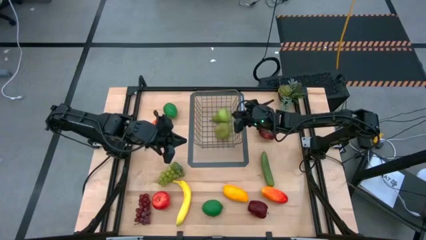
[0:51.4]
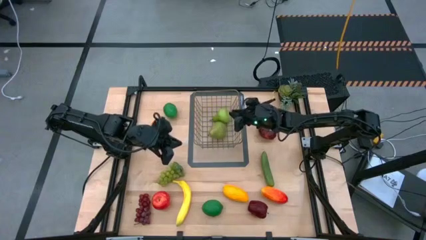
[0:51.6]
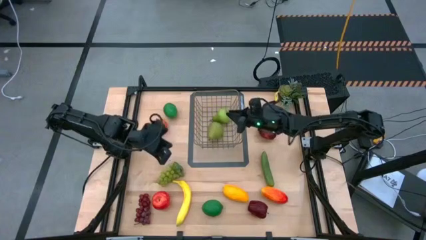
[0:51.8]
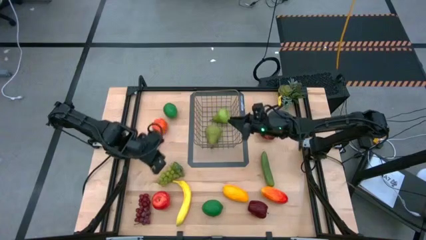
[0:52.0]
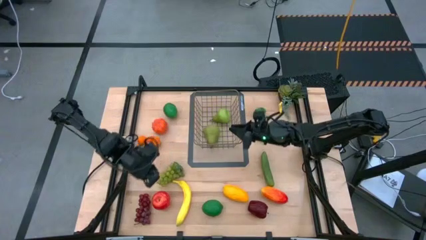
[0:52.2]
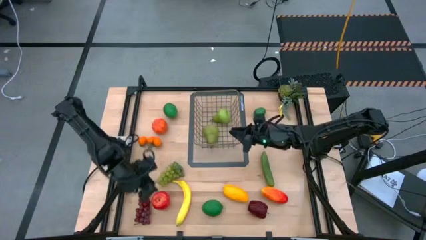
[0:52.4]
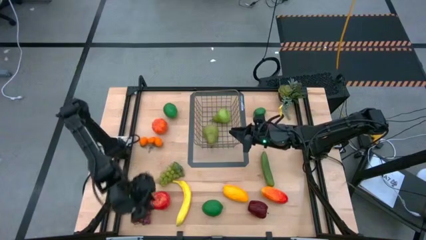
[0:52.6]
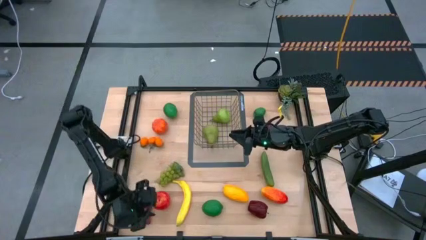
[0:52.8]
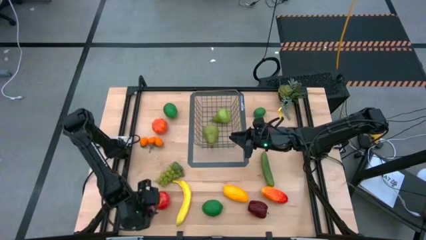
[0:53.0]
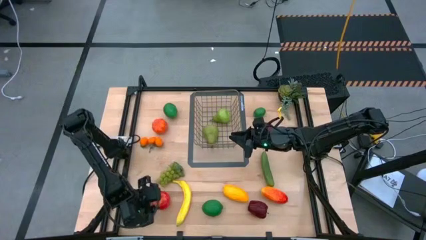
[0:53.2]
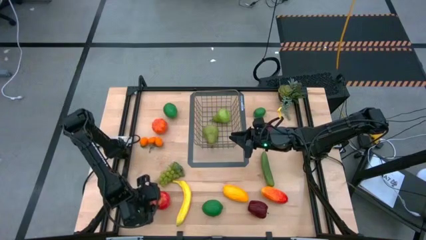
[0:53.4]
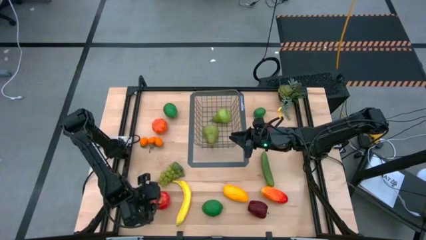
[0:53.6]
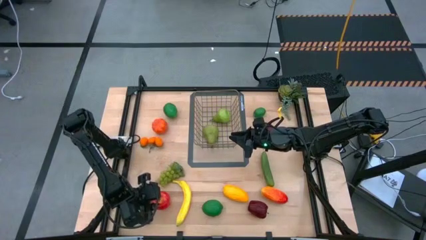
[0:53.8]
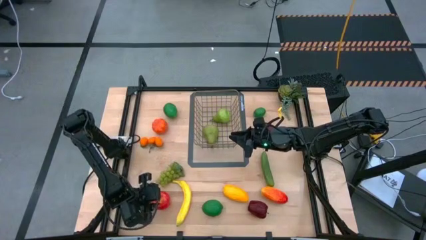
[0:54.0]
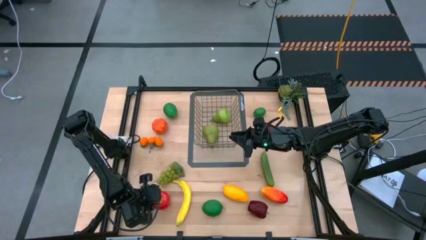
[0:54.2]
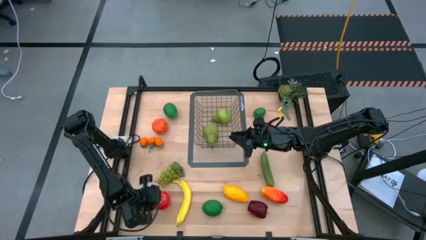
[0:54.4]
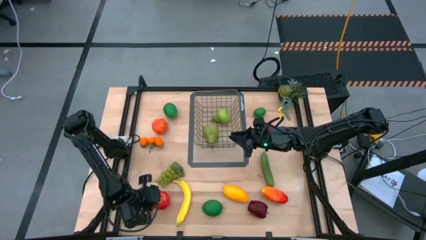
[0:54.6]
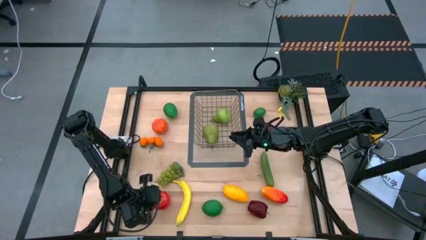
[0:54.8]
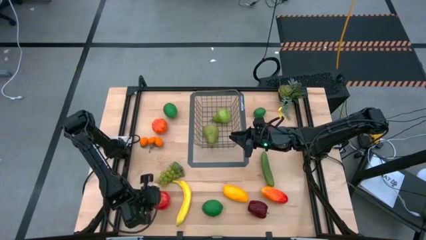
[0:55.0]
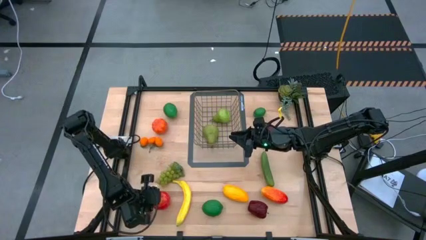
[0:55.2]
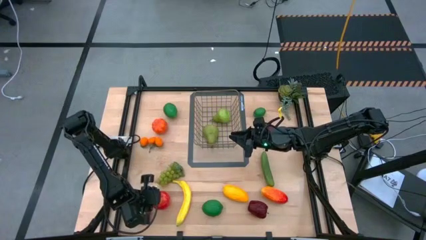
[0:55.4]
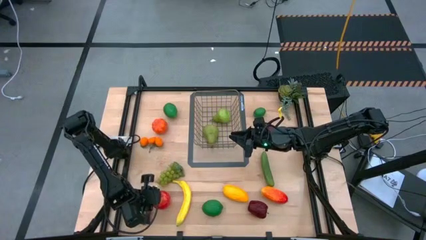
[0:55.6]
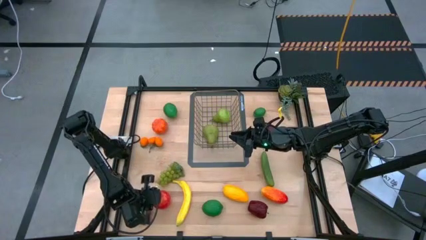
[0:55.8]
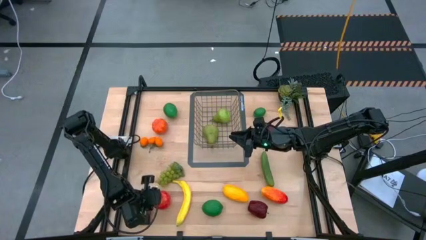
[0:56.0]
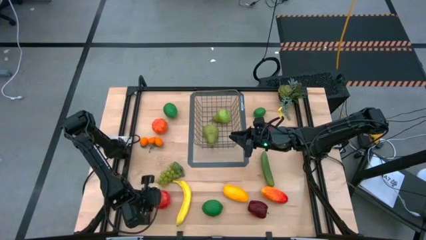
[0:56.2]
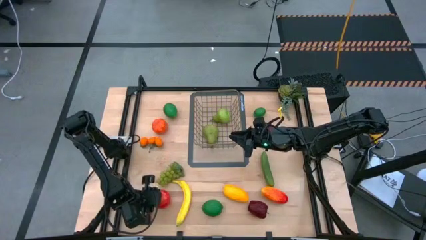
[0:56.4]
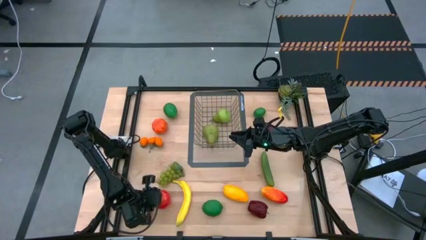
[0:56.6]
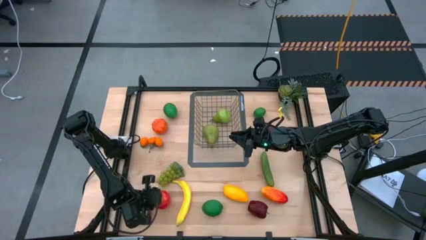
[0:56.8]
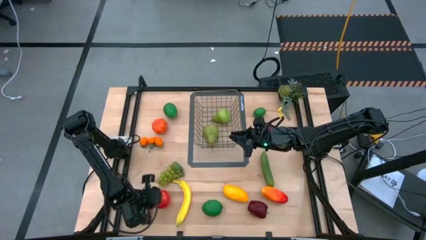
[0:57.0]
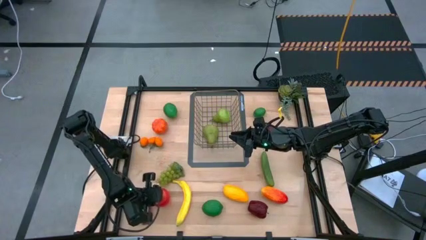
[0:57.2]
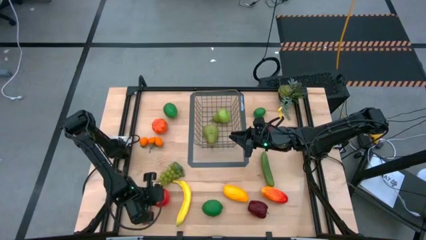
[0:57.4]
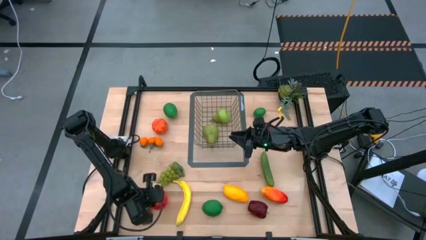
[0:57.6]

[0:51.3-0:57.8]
Task: Build produce basket
Put the red apple into the gold wire basket

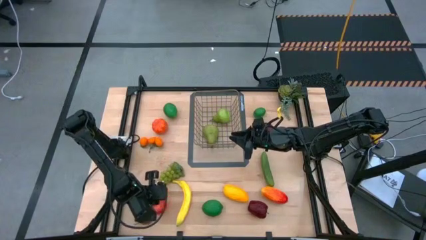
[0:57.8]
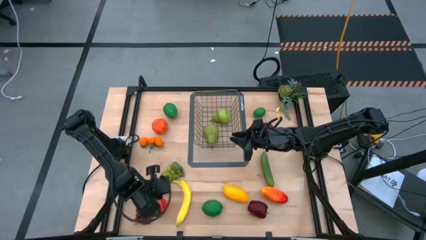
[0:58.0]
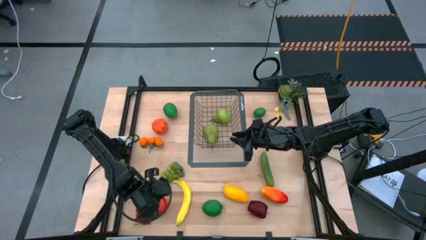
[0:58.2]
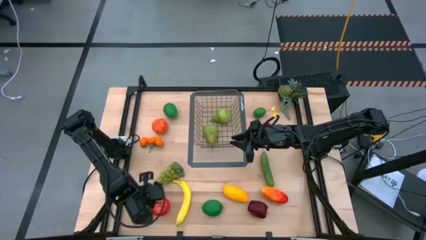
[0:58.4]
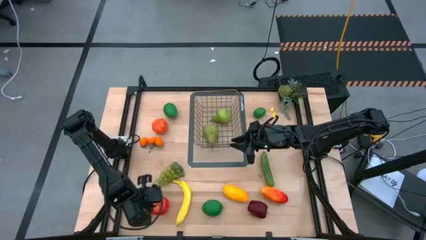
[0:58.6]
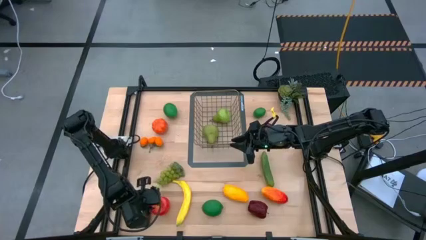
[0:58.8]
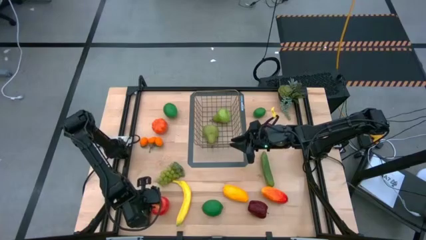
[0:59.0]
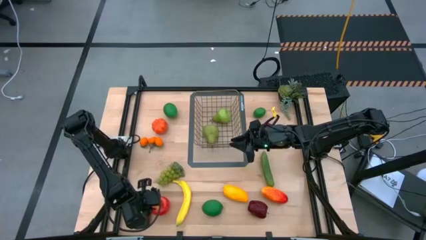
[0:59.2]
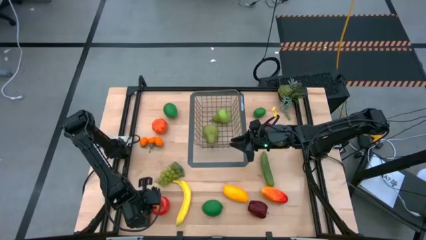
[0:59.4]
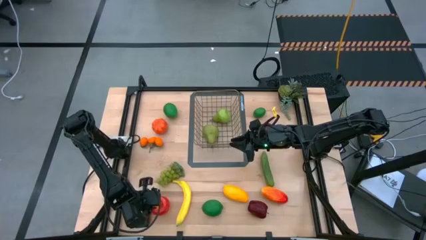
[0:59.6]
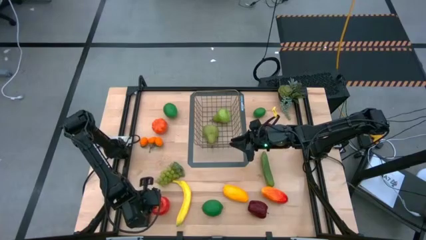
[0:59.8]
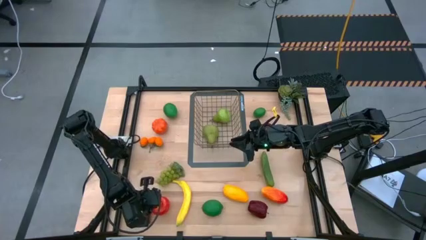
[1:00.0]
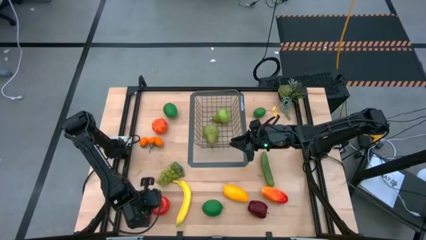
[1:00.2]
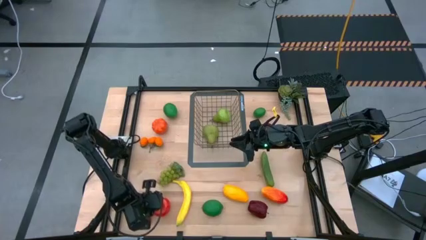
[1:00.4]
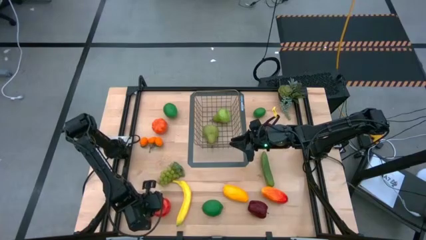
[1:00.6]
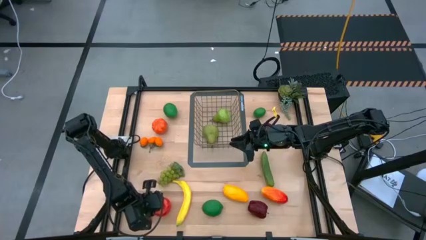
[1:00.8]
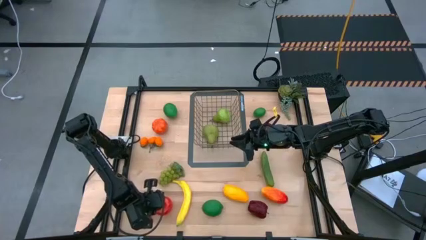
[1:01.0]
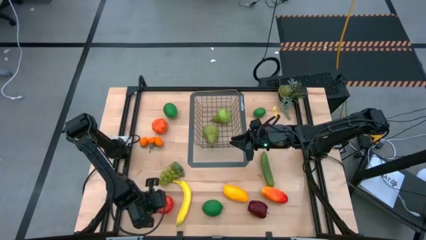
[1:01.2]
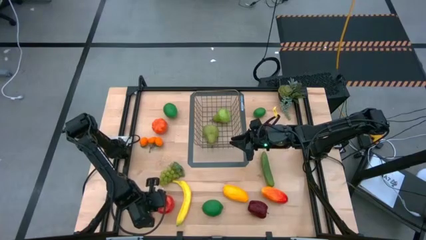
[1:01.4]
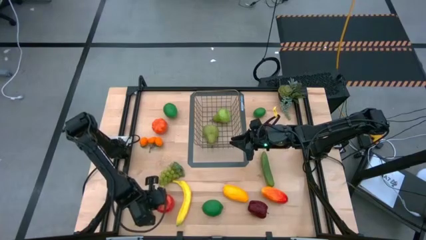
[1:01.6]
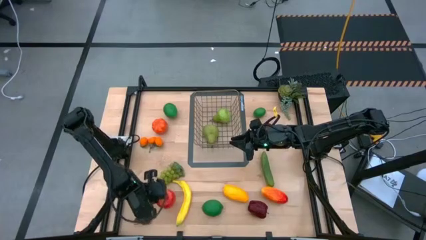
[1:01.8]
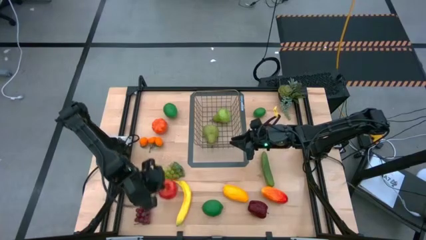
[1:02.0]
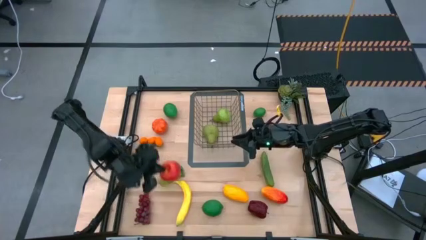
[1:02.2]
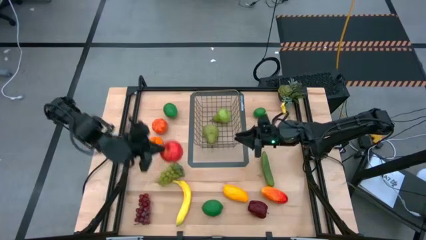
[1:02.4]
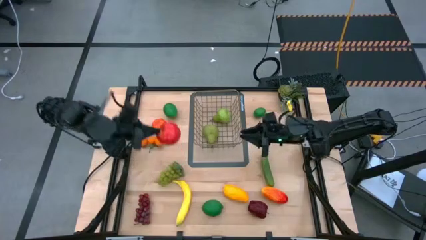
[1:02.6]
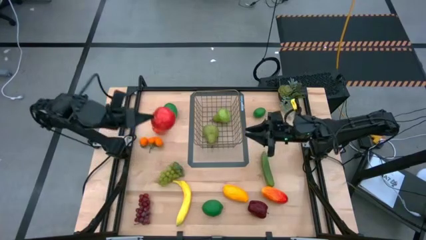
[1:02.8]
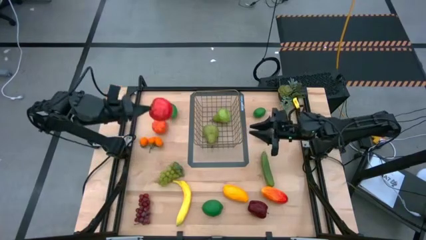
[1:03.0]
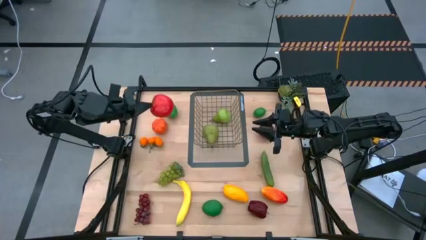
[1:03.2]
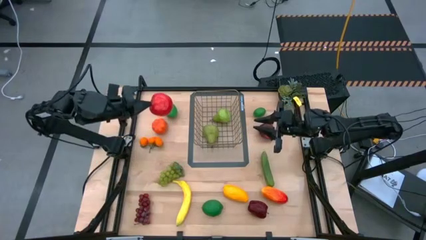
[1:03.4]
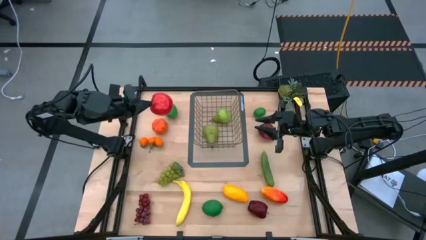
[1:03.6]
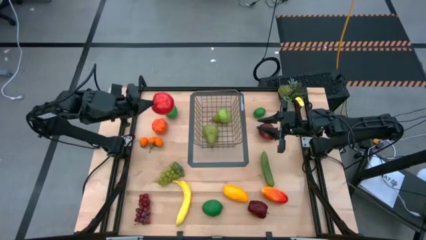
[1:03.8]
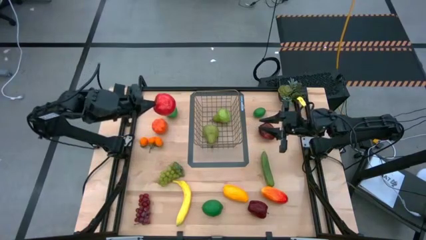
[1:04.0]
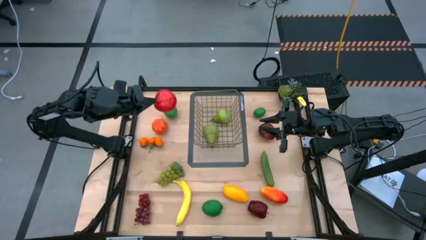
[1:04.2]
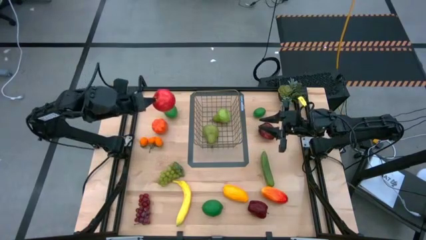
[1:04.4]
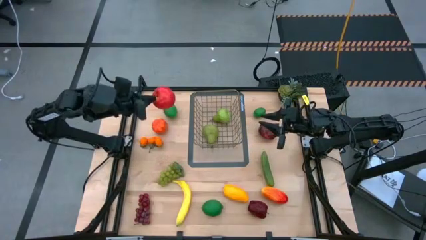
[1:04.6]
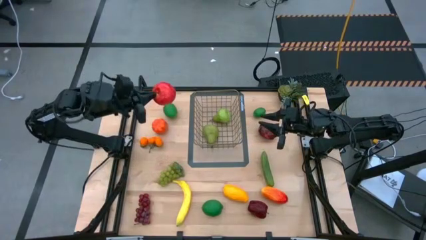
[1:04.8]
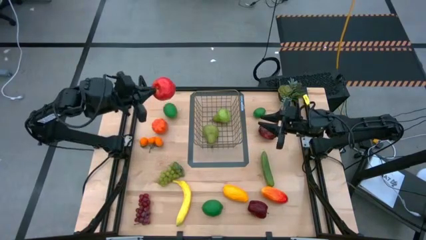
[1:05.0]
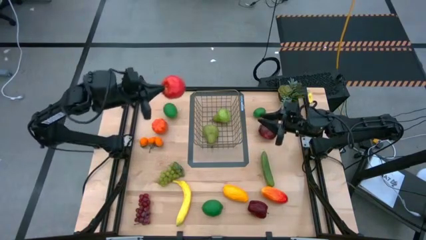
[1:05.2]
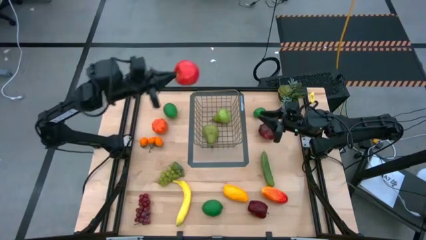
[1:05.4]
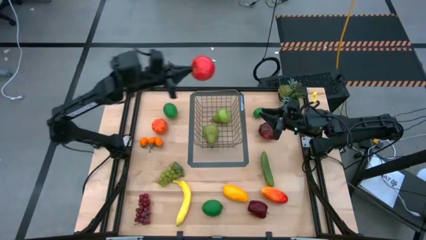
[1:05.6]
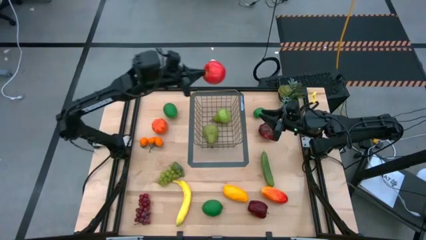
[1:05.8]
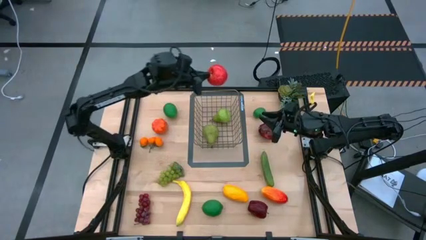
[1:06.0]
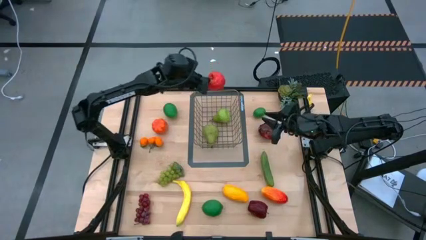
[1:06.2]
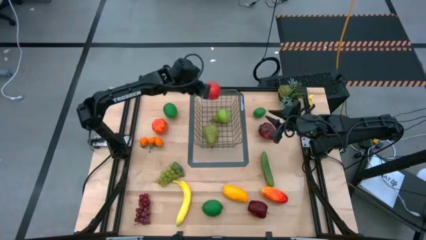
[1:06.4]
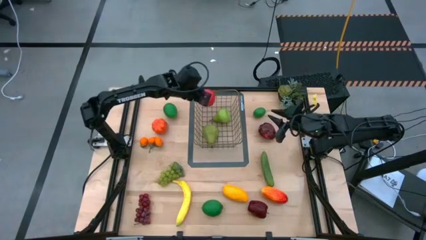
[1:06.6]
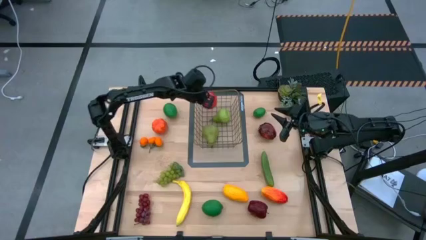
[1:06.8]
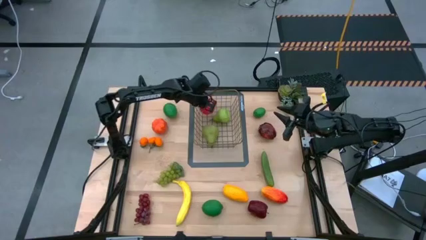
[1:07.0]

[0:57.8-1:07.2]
Put the red apple into the gold wire basket
